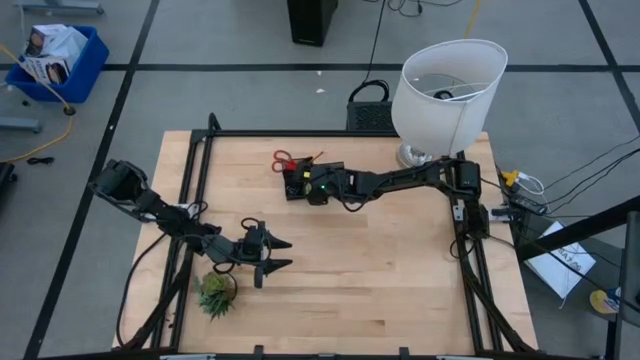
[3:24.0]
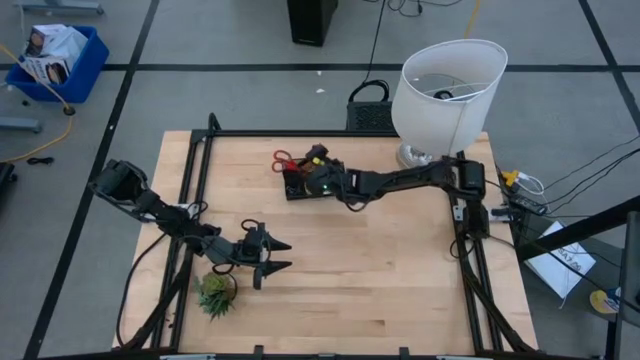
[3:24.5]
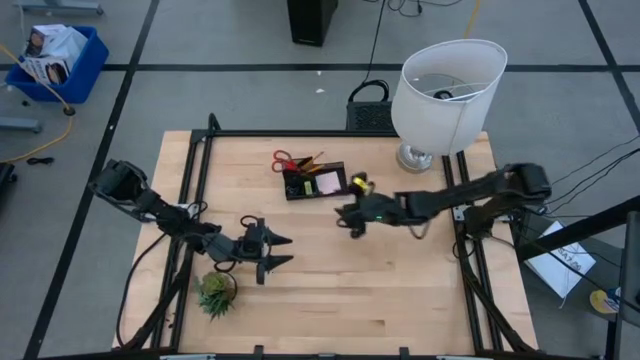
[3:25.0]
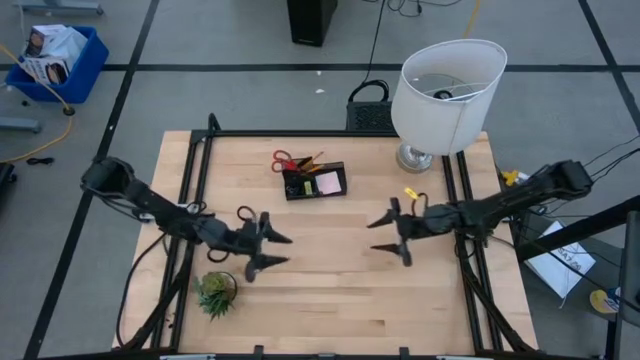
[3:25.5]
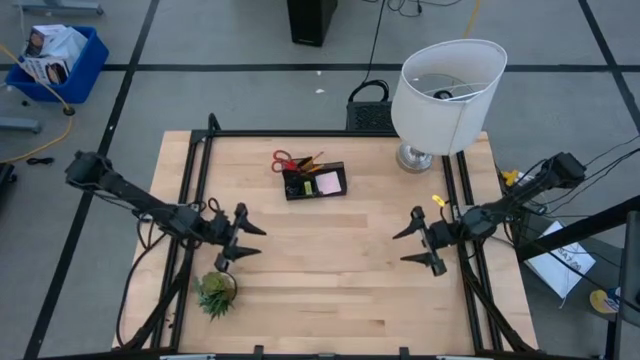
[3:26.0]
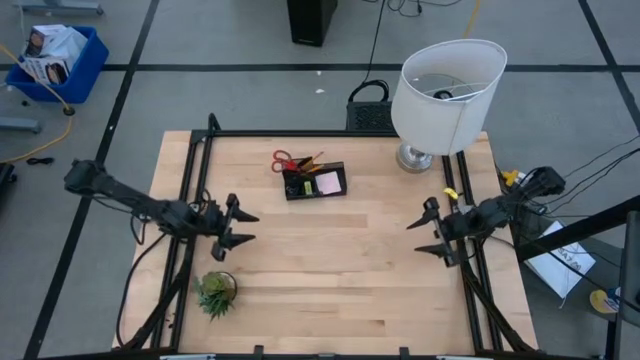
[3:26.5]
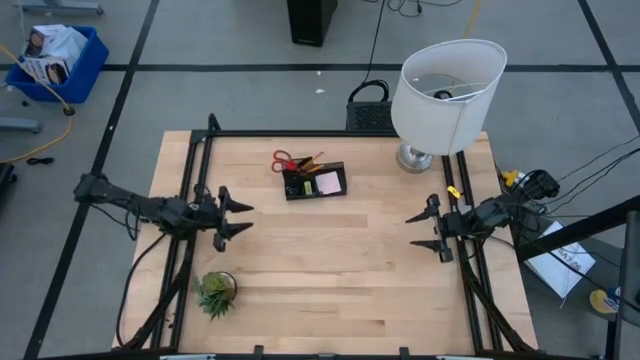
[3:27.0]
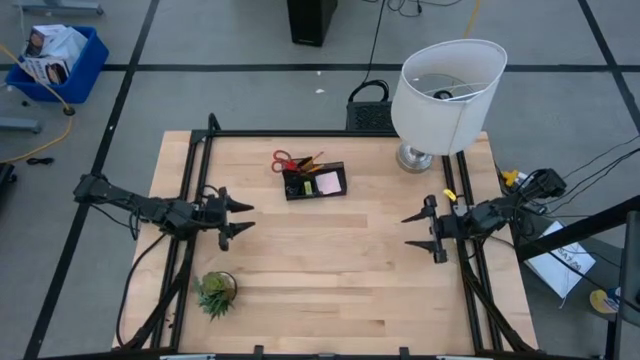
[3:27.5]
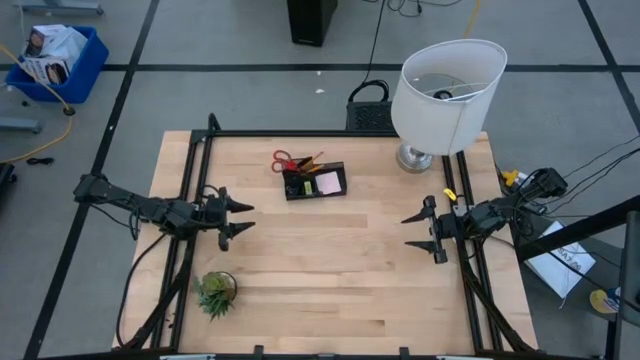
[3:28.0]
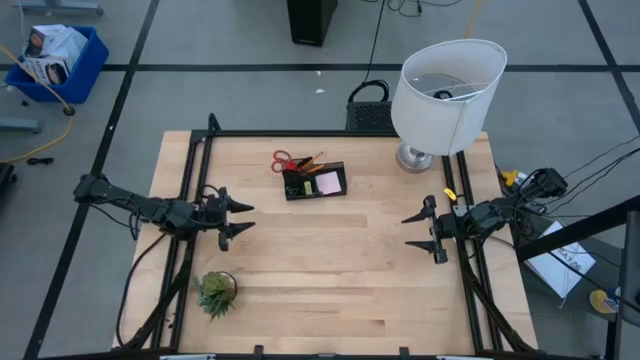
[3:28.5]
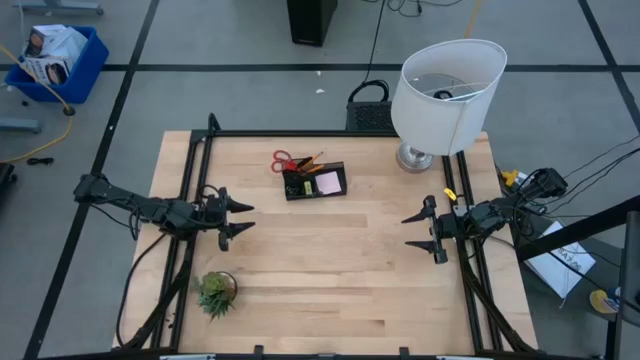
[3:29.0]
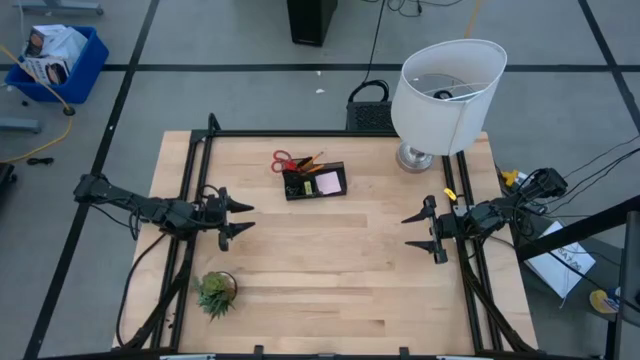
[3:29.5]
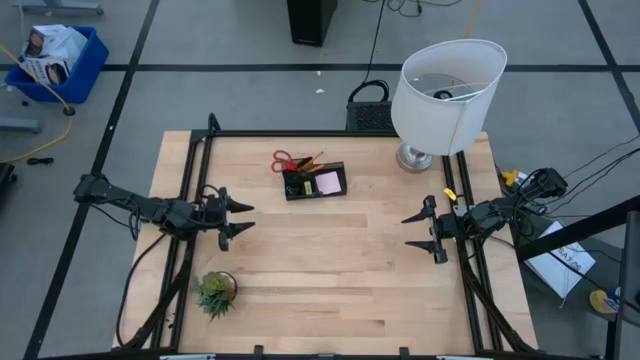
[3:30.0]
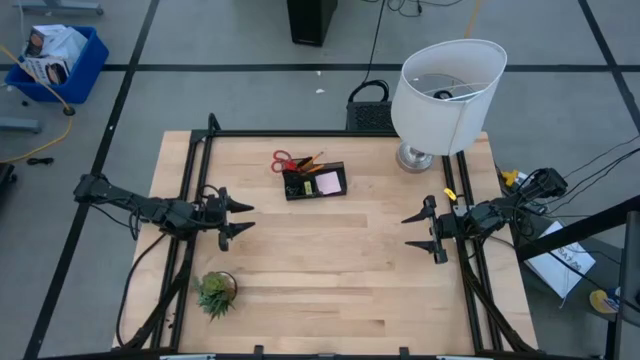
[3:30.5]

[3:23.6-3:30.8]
Task: Pick and place office supplies into organizer
Return to home position
